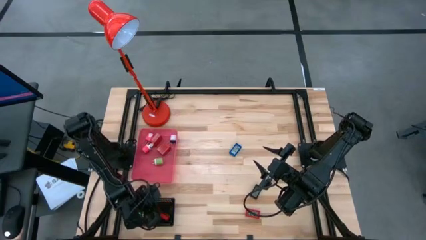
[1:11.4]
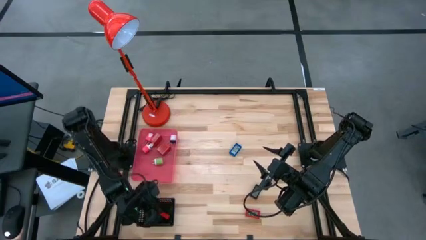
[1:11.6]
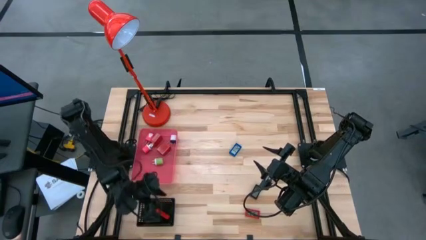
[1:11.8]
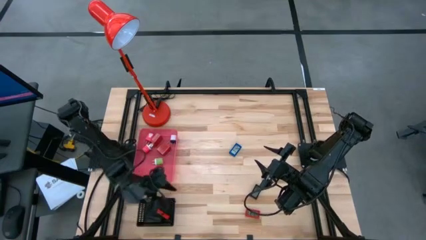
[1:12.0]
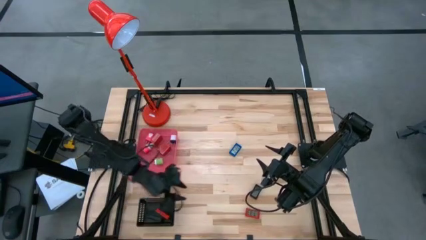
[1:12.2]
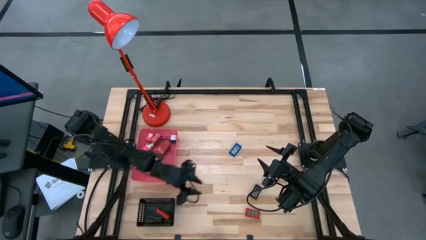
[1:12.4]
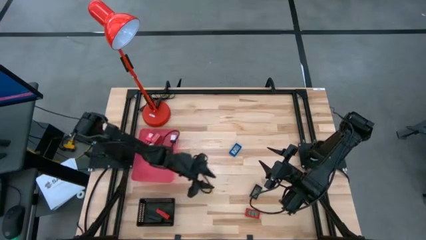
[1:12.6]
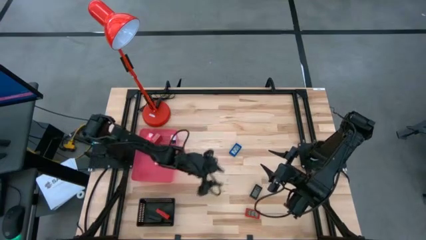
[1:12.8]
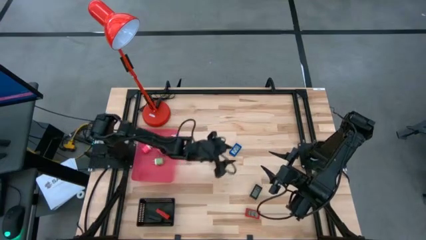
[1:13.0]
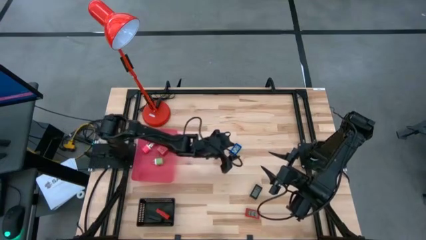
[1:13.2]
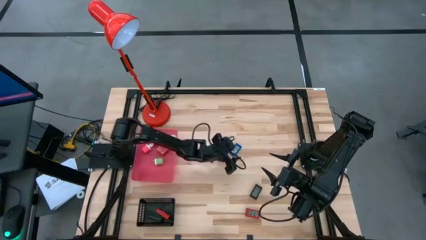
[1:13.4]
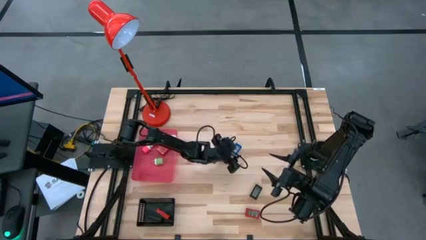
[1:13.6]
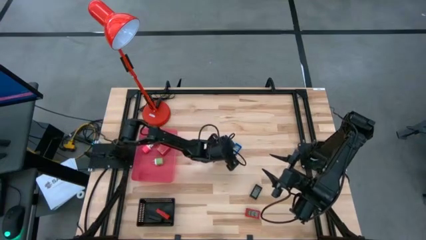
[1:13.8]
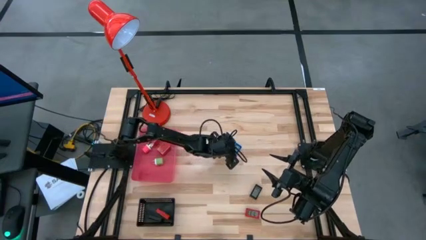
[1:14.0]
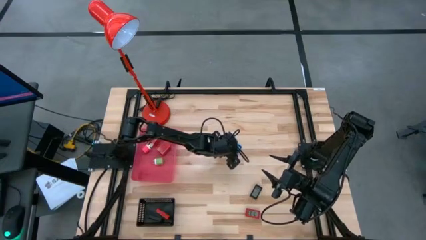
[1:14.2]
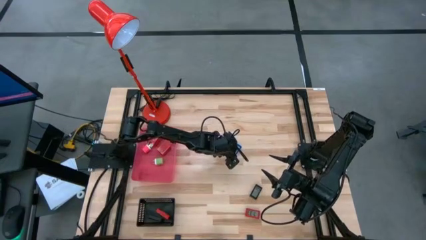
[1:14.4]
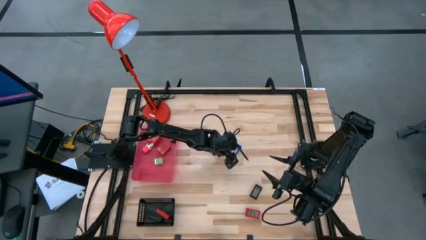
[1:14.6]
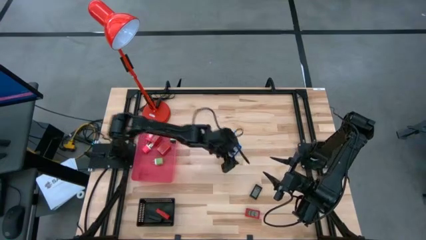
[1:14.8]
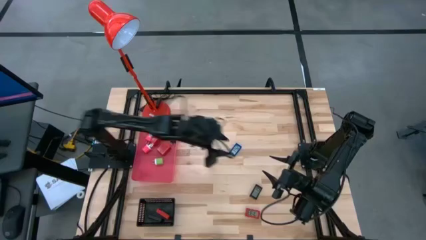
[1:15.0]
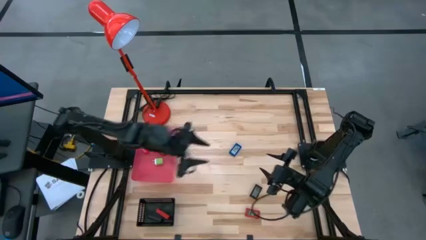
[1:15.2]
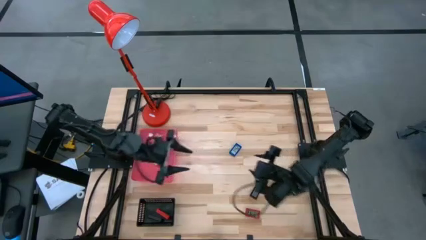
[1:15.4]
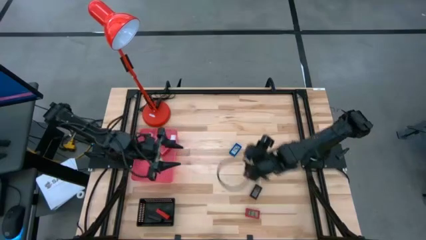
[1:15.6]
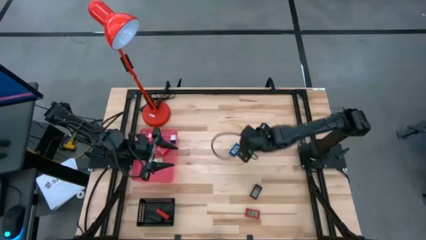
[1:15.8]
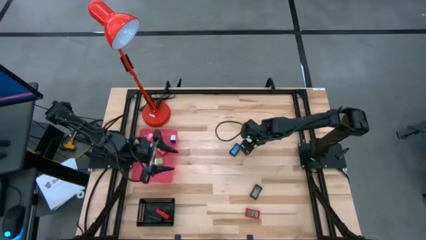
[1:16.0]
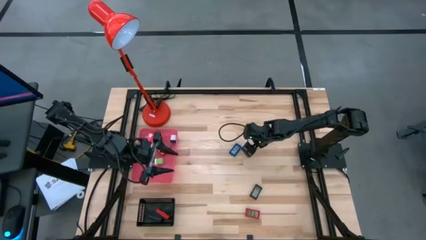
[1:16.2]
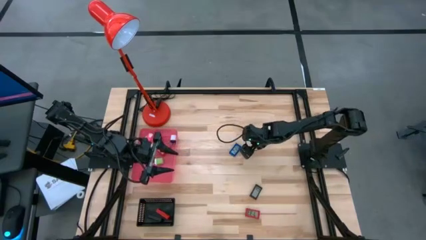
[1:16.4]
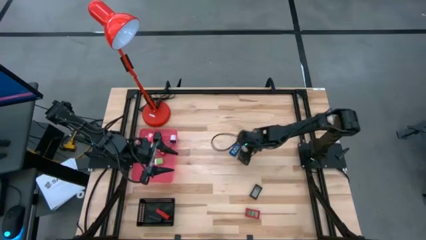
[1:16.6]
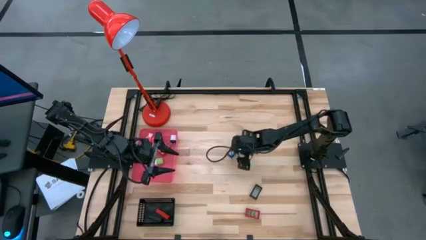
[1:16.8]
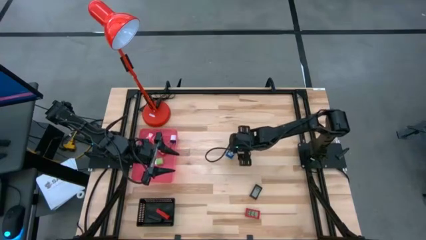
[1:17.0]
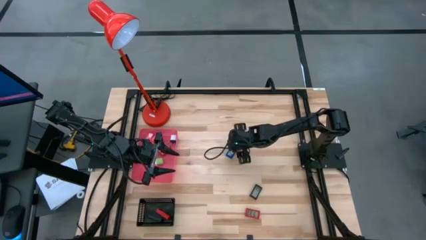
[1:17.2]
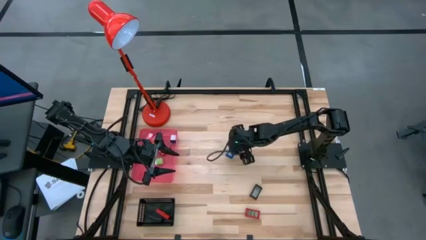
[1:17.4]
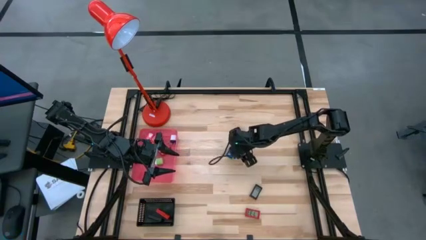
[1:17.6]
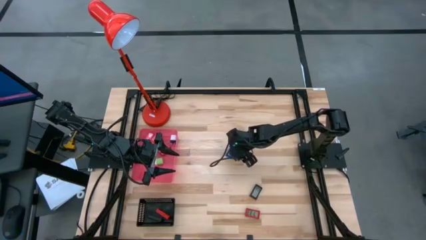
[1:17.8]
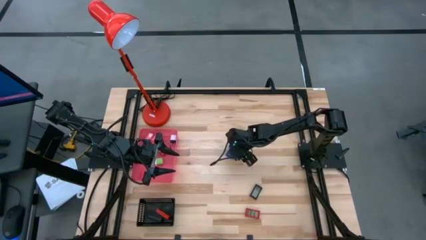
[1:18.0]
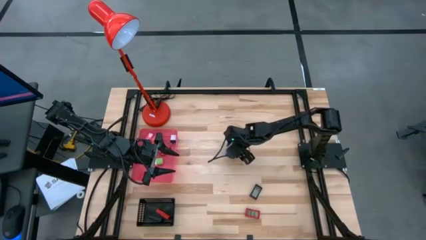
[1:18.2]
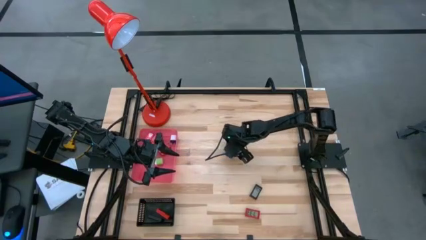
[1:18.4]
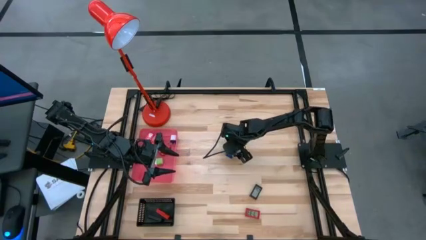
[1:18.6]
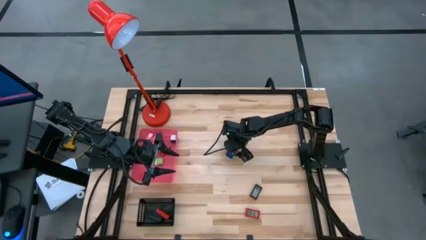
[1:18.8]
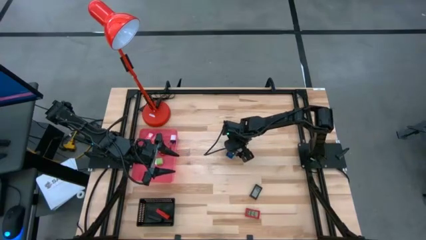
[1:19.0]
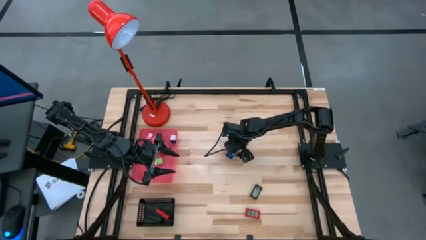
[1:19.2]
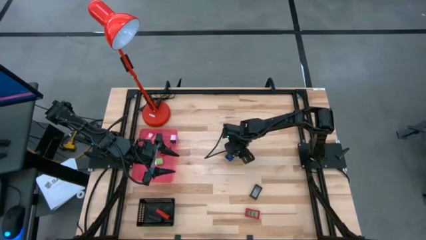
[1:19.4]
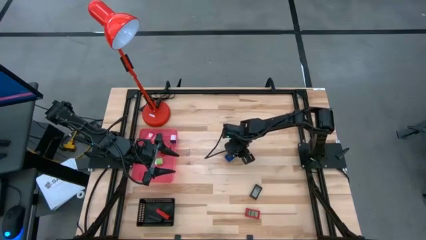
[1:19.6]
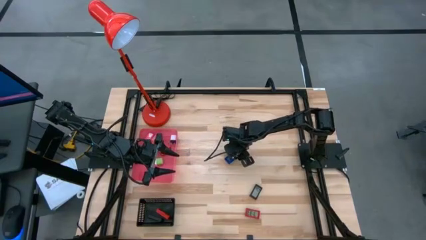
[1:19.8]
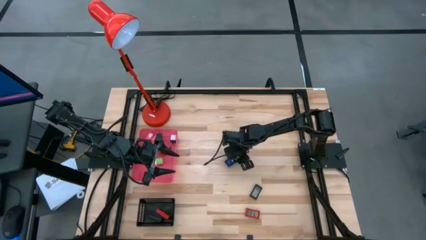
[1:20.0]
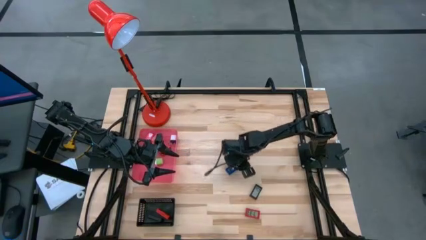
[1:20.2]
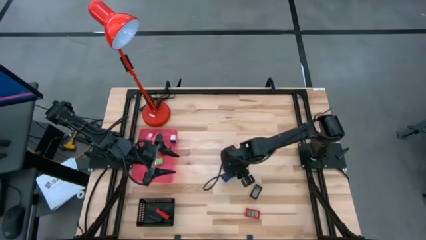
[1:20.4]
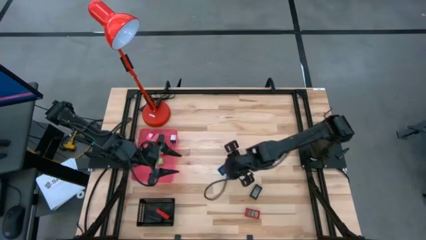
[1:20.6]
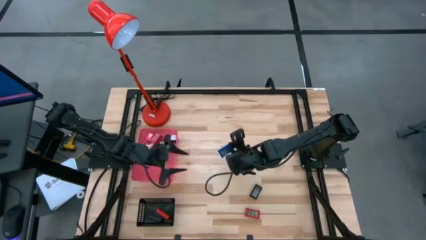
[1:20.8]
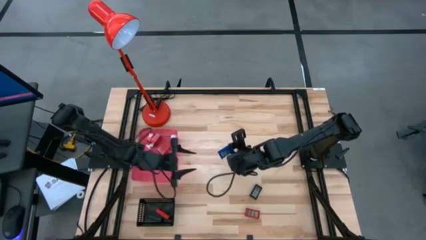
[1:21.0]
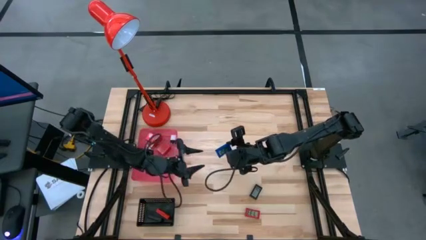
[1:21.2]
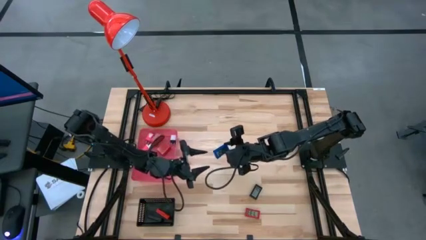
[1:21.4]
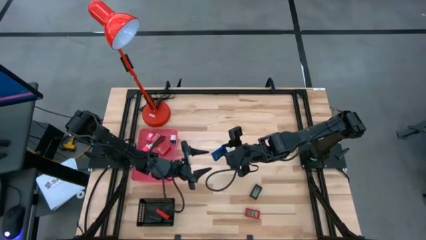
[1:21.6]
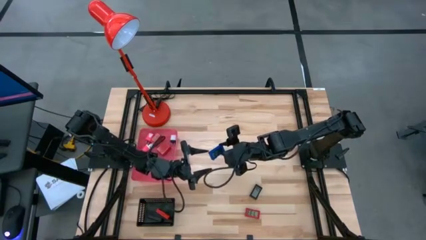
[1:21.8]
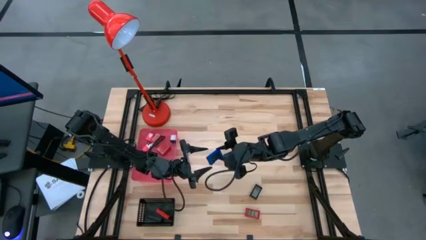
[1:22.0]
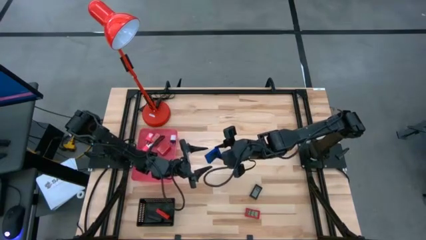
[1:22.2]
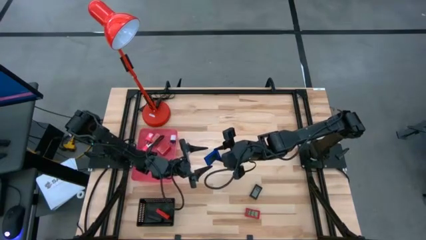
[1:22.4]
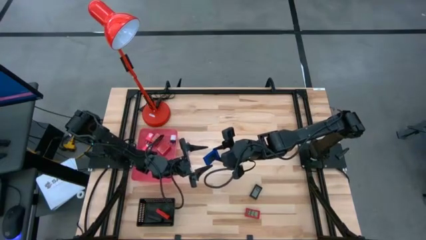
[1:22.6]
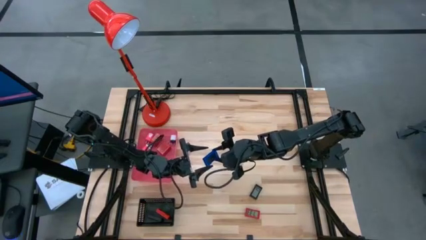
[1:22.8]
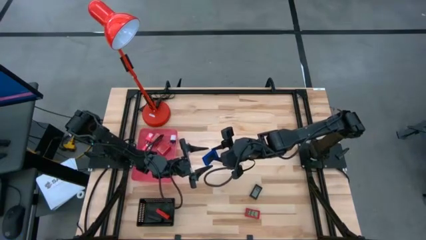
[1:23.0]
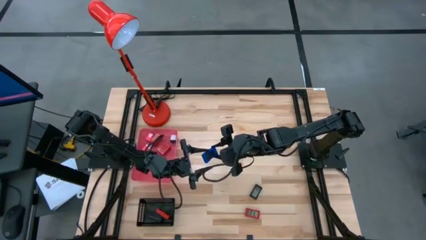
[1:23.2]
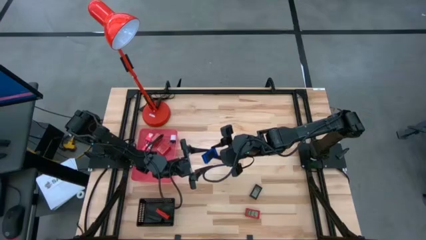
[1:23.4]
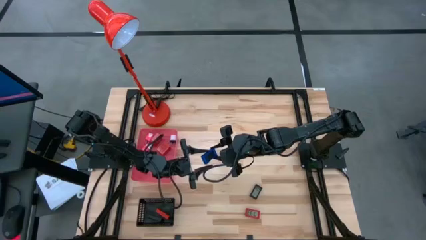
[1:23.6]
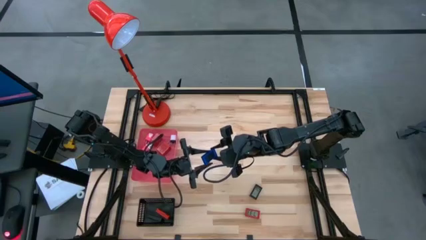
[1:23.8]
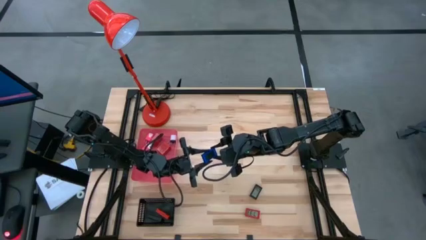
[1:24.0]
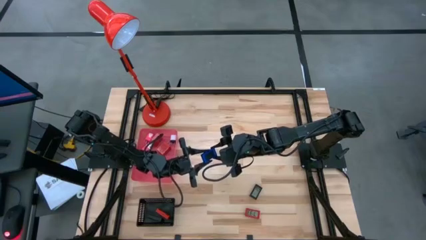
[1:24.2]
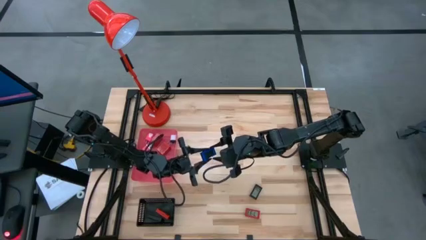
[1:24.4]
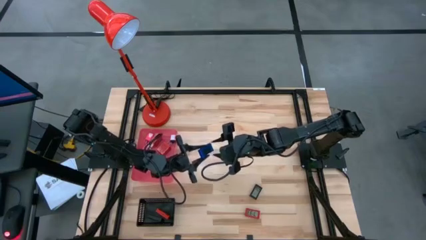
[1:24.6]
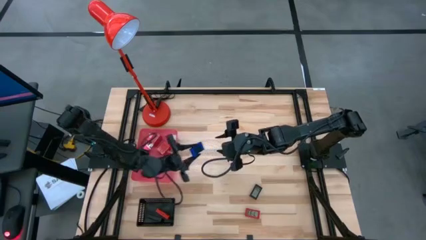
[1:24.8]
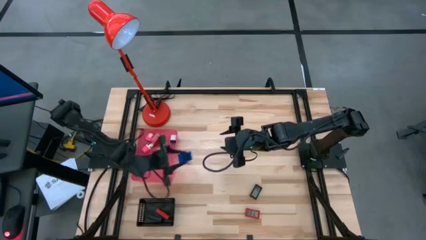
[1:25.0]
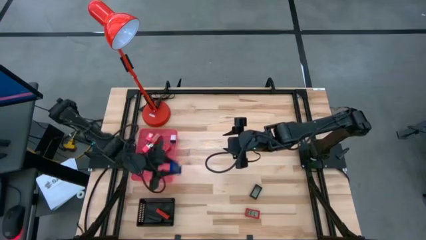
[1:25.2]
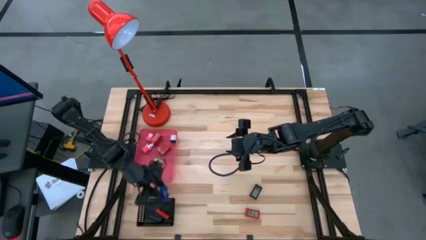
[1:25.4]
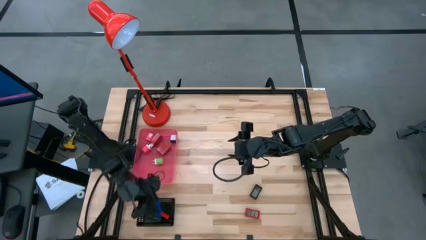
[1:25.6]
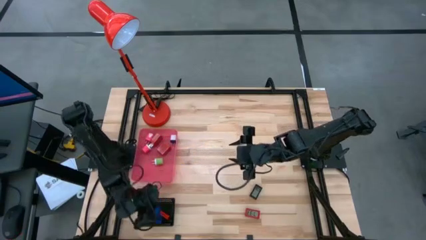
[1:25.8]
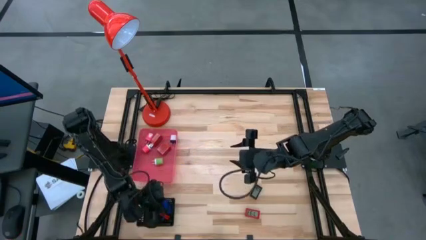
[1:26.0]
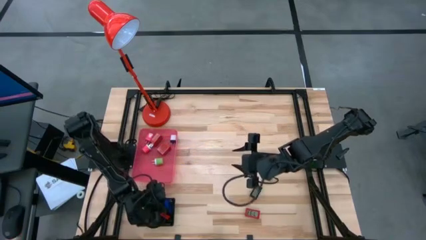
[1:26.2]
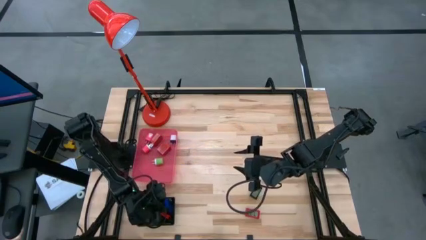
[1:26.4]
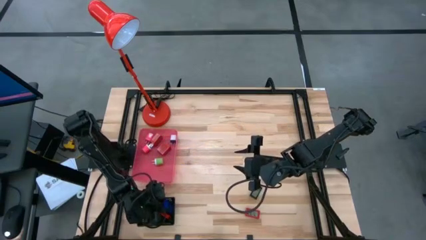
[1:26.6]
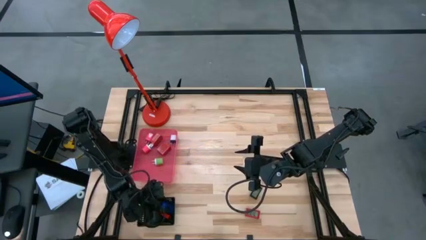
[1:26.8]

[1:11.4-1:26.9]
Task: Pick & Place Office items
Put the blue digital timer into the black bin

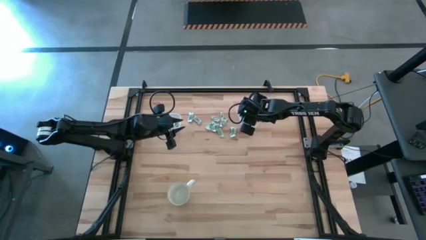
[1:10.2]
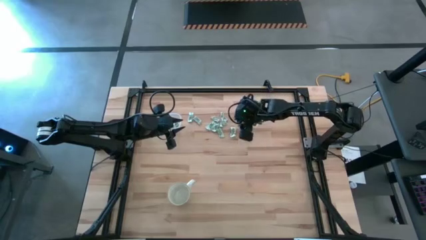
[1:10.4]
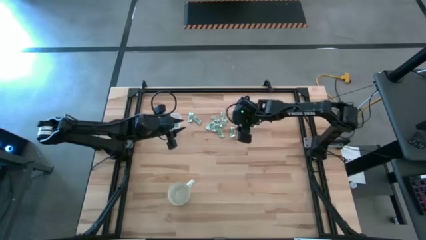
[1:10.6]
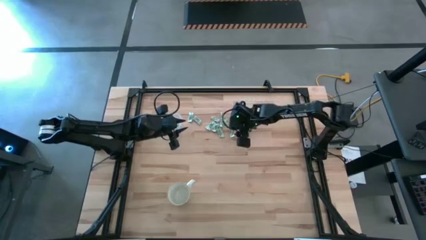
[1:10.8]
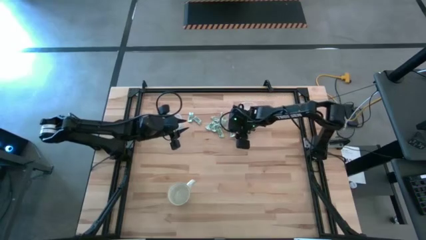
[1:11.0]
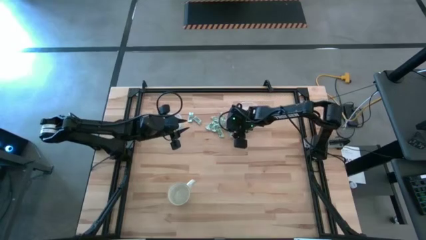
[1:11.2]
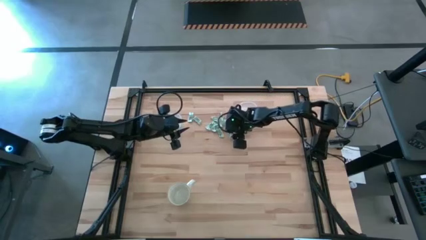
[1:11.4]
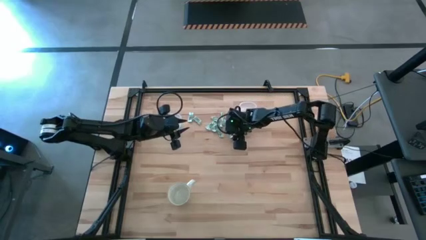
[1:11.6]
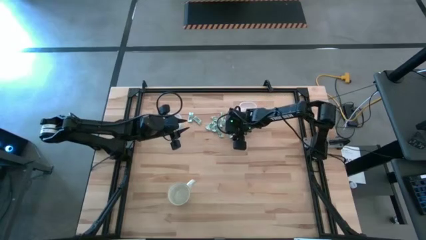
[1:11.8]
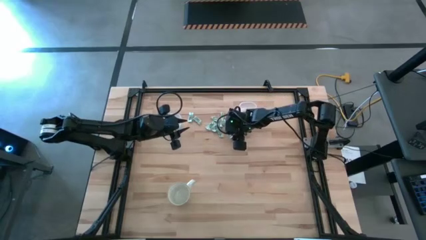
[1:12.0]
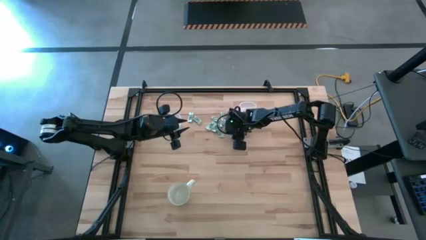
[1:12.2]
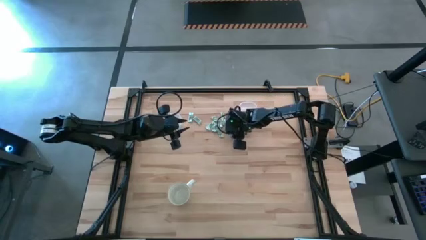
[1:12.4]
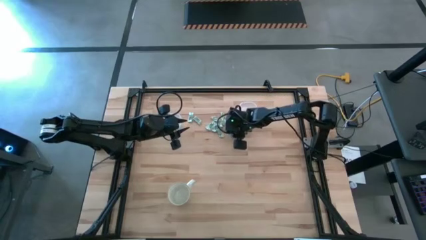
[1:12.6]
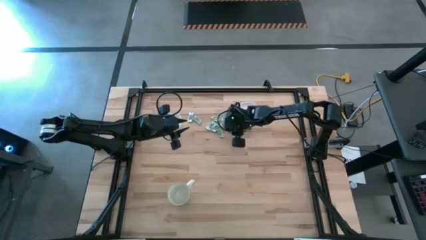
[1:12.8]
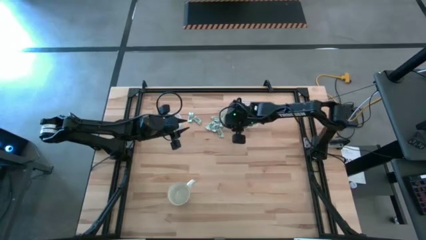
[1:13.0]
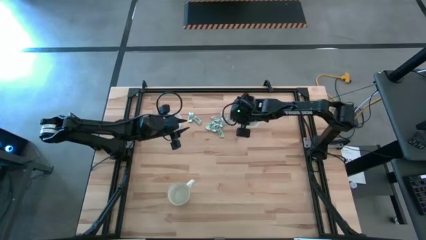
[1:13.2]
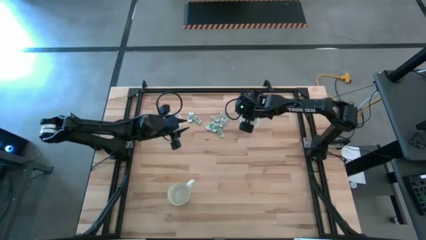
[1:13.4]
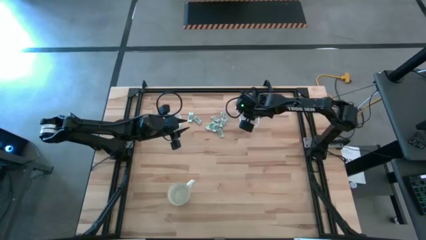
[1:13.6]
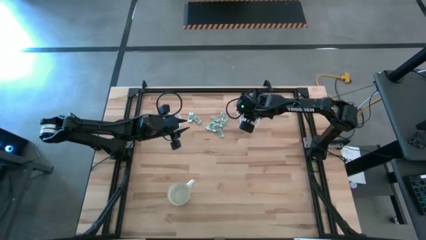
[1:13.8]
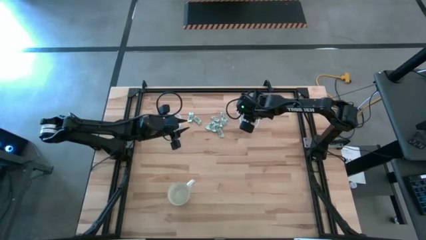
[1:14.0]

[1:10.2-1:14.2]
Task: Pick and place items into bin
Put the green stevia packet into the rectangular transparent bin
